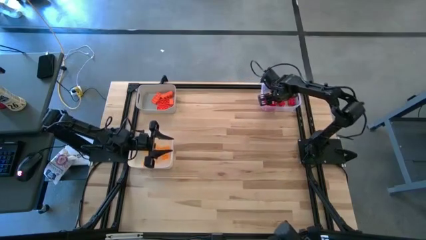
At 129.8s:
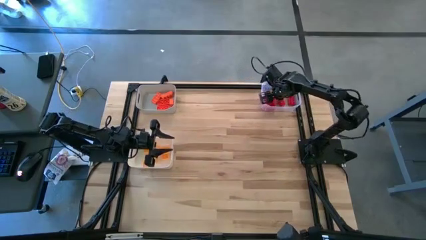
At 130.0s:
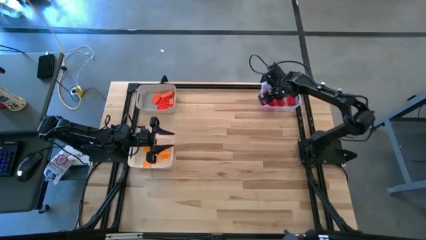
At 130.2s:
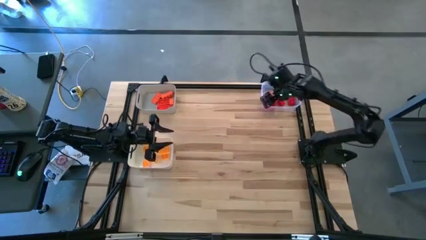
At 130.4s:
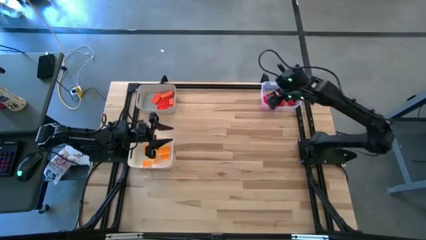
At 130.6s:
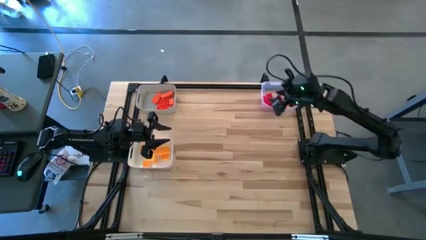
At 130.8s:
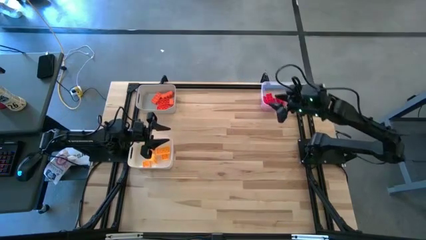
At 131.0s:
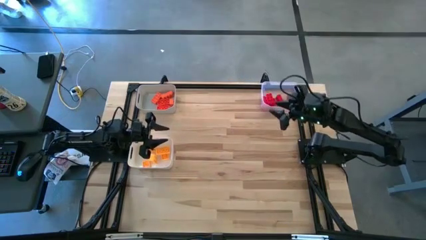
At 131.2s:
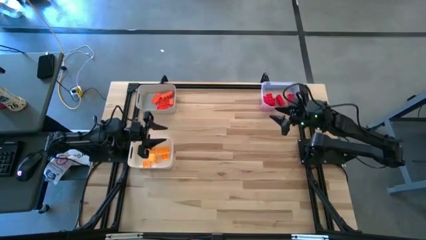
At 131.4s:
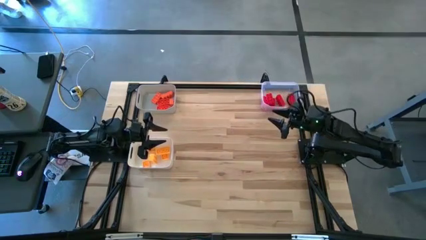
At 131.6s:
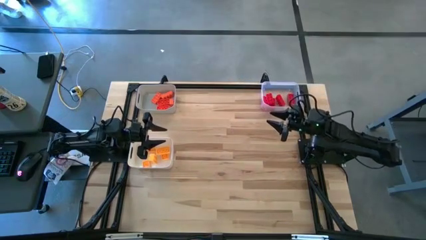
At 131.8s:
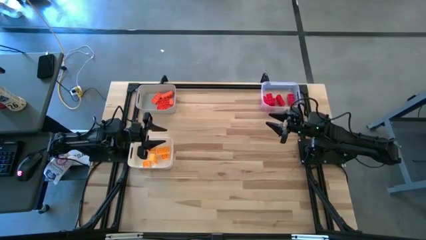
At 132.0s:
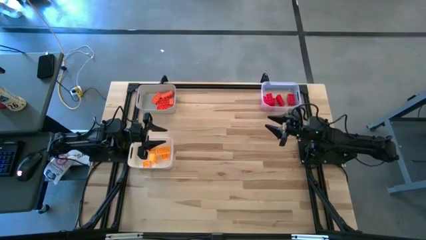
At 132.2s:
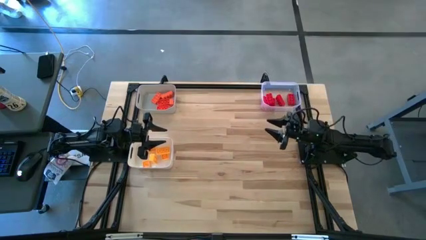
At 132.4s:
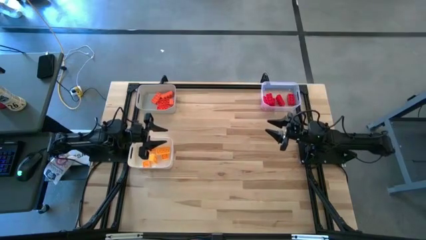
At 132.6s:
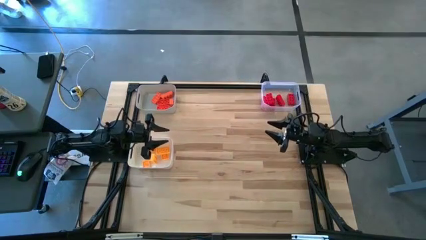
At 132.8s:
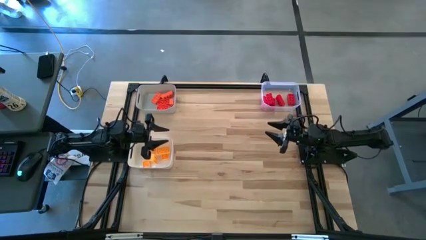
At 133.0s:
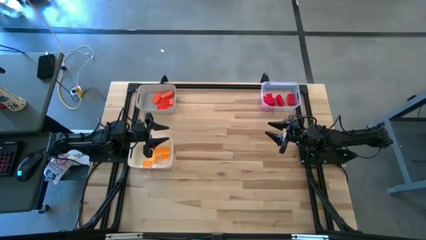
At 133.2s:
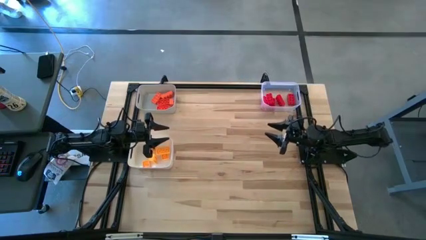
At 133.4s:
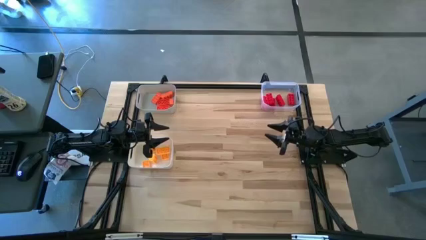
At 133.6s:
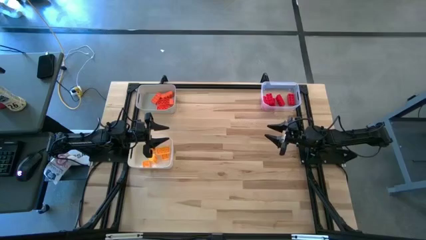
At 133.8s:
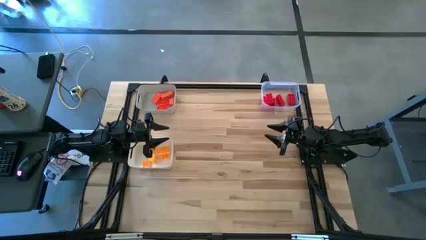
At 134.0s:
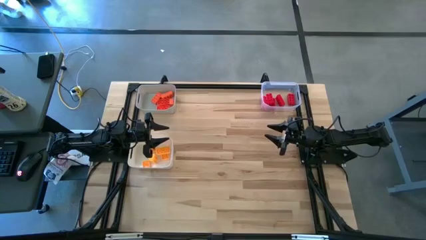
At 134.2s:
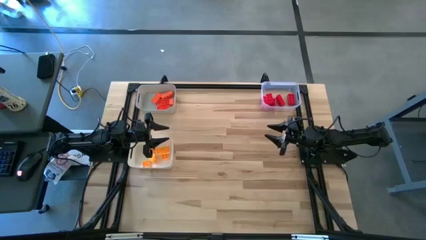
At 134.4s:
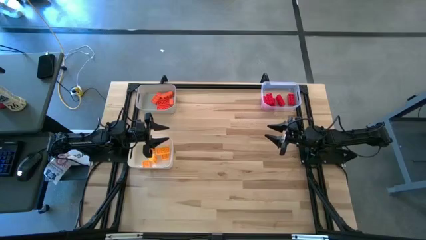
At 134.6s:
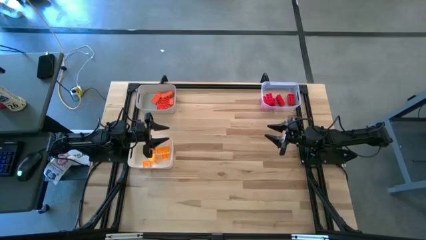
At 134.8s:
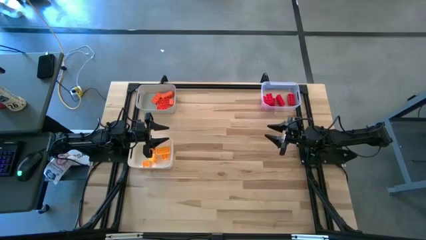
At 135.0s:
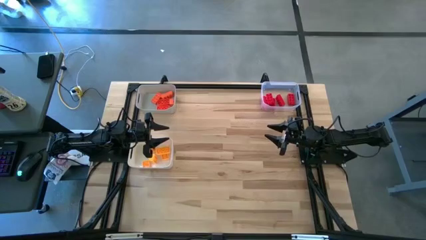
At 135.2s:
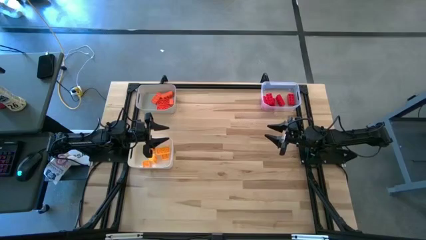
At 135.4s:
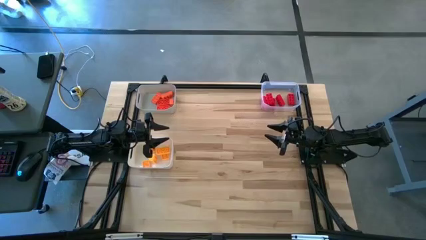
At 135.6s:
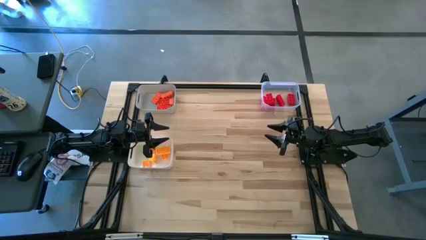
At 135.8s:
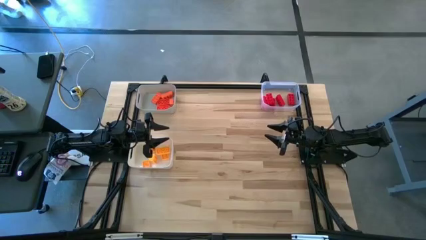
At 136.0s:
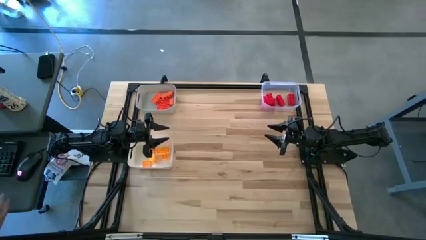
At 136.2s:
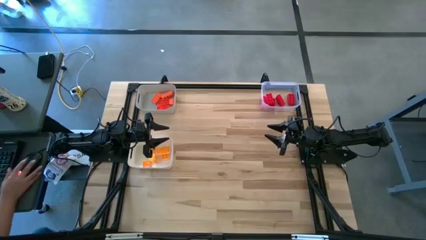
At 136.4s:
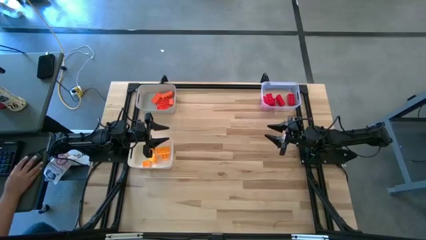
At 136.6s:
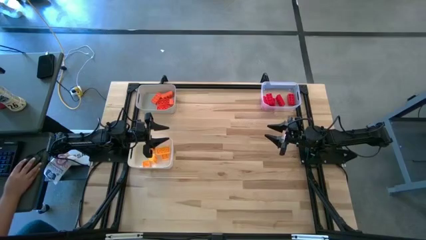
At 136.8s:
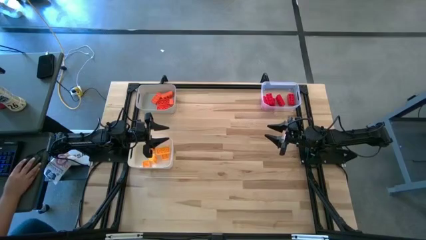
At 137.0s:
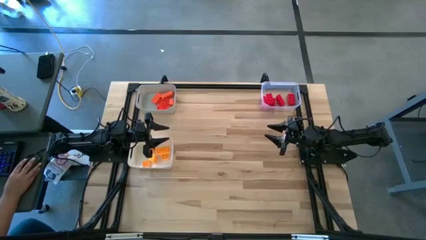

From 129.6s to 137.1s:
Task: Sort & place blocks by color
Return to Home Position

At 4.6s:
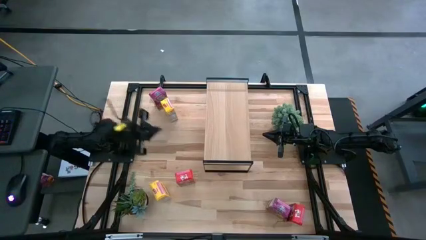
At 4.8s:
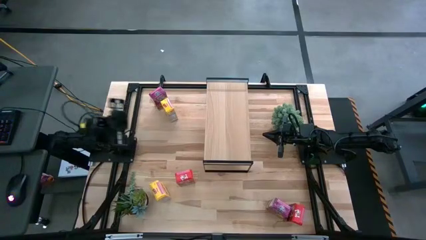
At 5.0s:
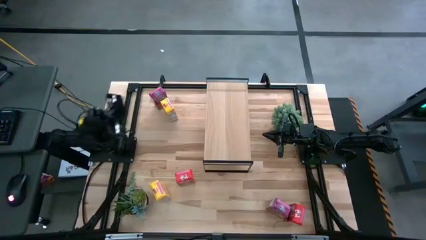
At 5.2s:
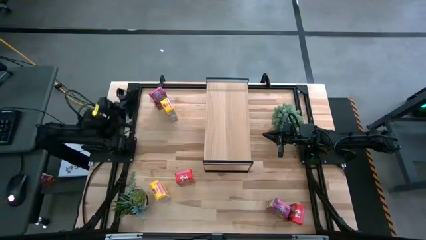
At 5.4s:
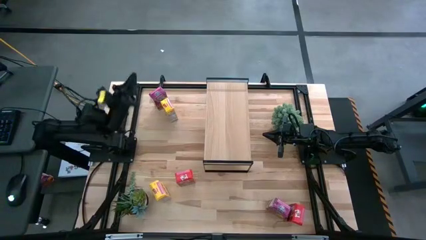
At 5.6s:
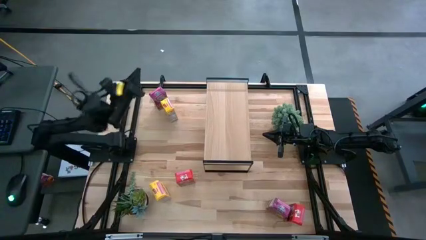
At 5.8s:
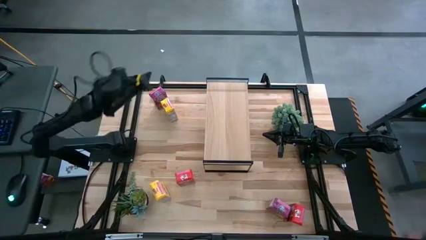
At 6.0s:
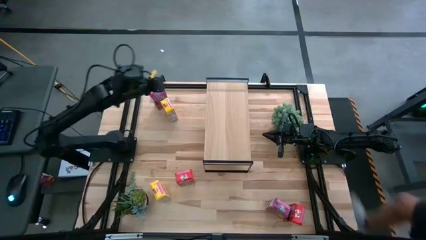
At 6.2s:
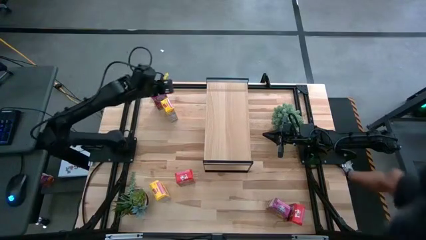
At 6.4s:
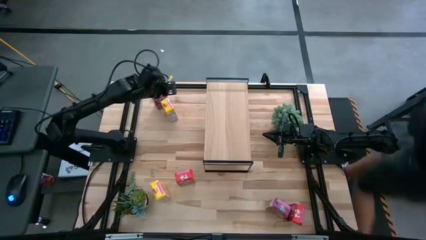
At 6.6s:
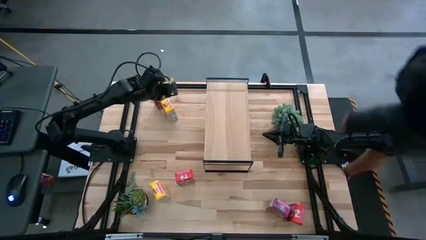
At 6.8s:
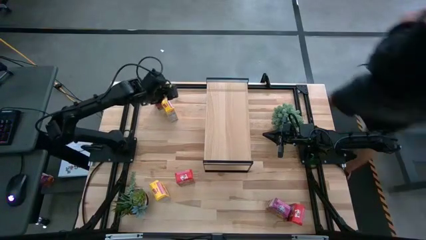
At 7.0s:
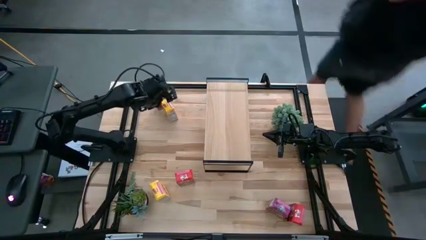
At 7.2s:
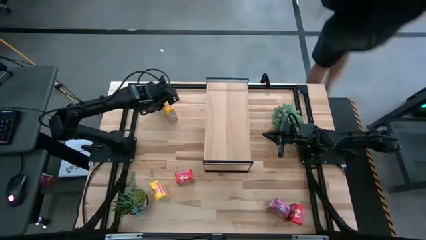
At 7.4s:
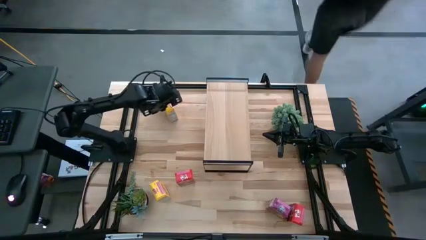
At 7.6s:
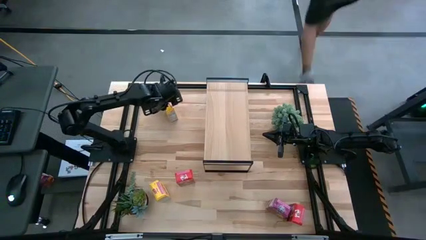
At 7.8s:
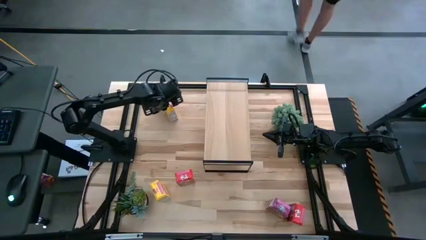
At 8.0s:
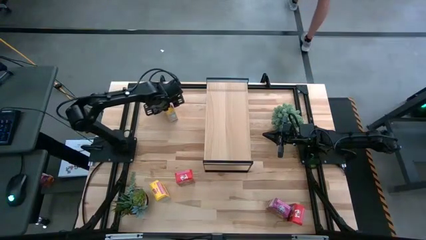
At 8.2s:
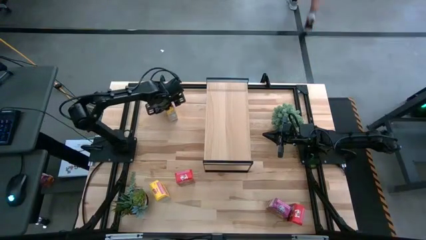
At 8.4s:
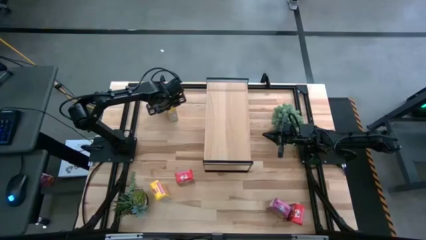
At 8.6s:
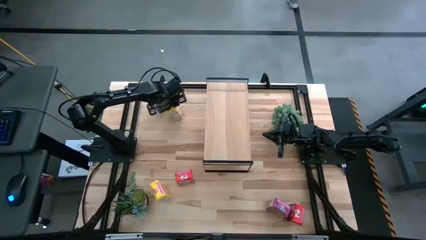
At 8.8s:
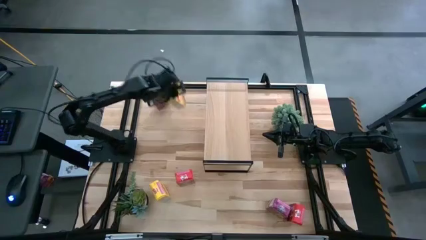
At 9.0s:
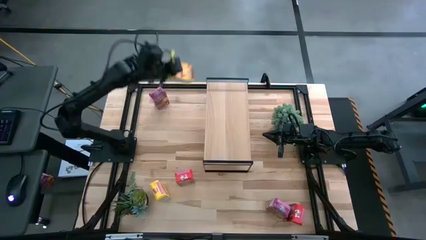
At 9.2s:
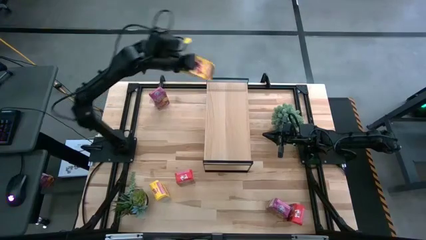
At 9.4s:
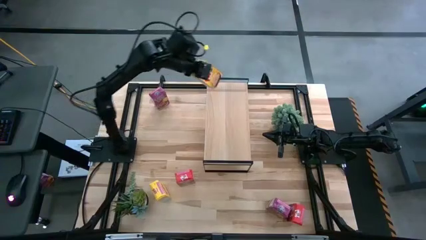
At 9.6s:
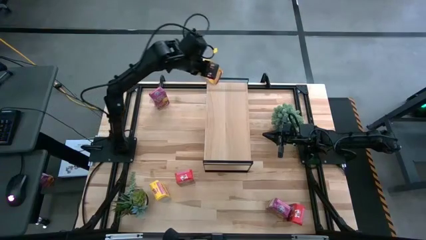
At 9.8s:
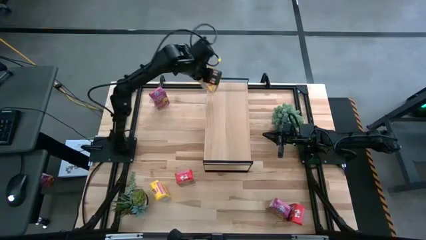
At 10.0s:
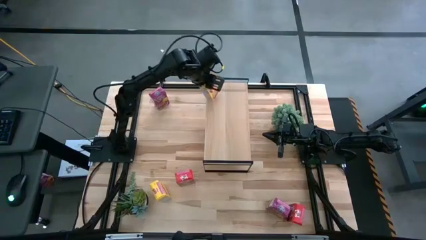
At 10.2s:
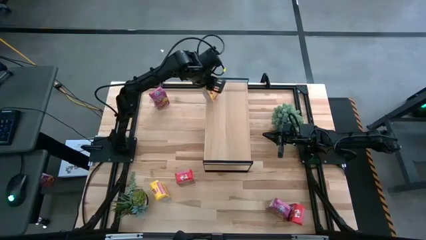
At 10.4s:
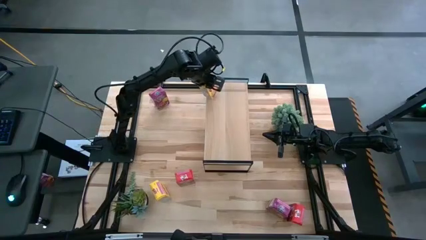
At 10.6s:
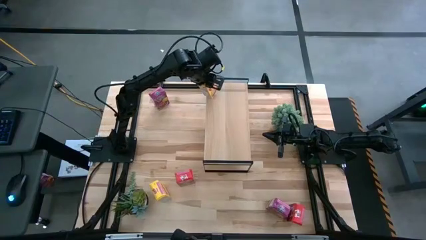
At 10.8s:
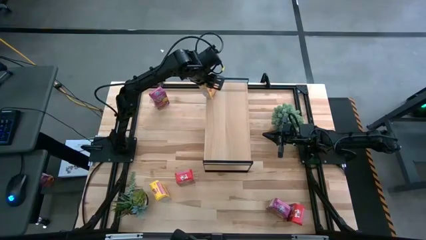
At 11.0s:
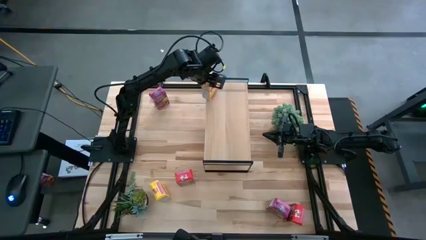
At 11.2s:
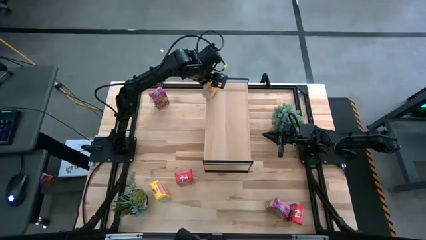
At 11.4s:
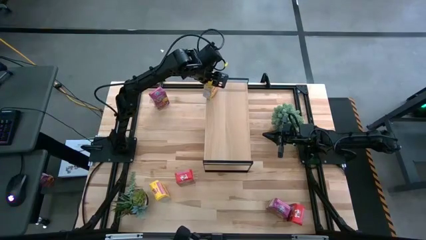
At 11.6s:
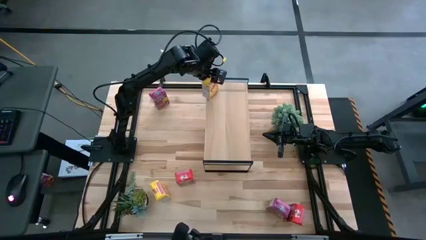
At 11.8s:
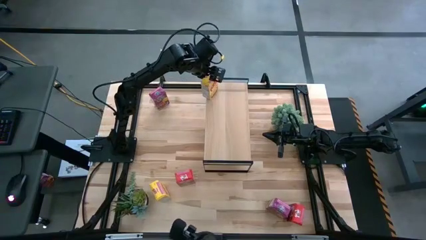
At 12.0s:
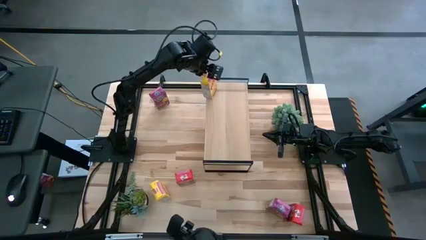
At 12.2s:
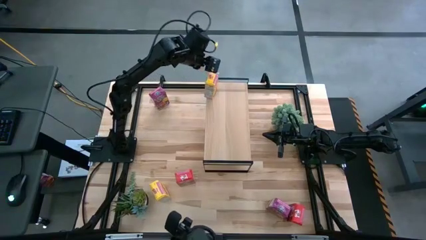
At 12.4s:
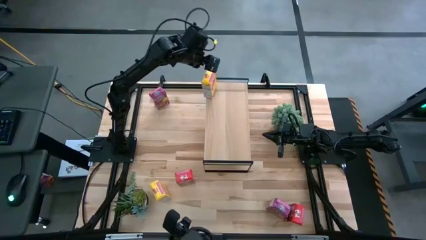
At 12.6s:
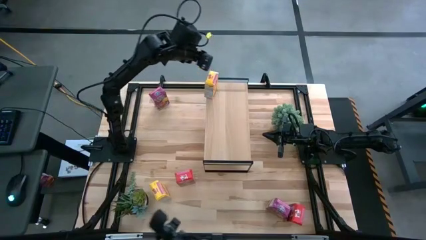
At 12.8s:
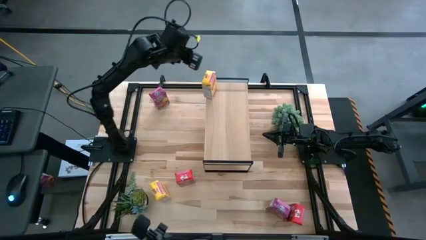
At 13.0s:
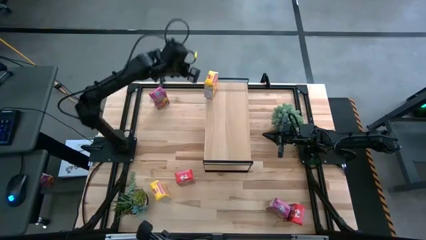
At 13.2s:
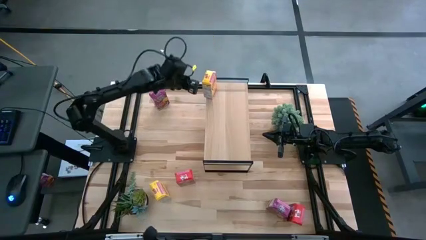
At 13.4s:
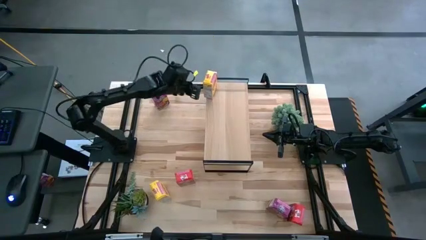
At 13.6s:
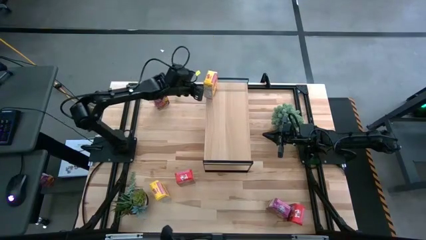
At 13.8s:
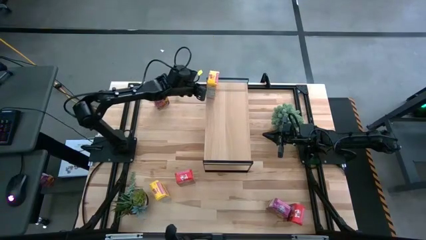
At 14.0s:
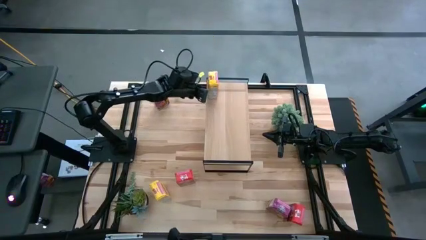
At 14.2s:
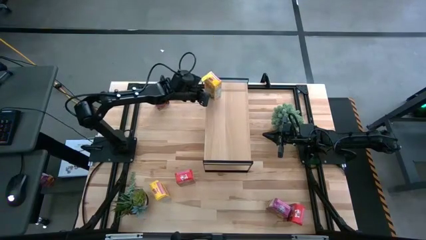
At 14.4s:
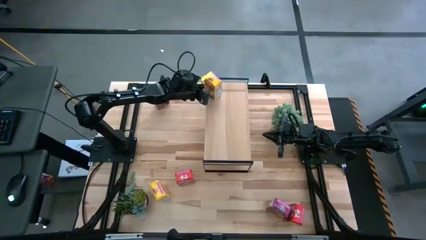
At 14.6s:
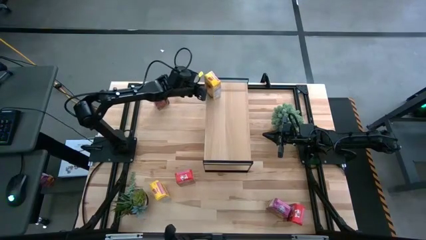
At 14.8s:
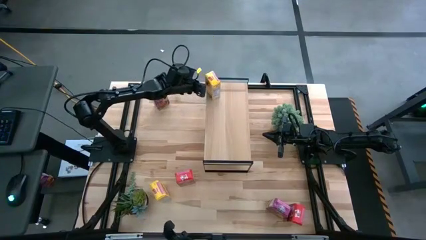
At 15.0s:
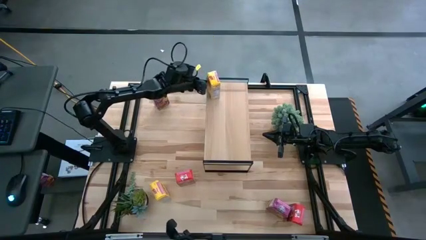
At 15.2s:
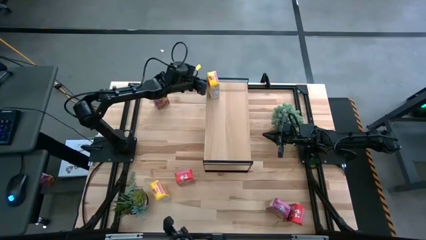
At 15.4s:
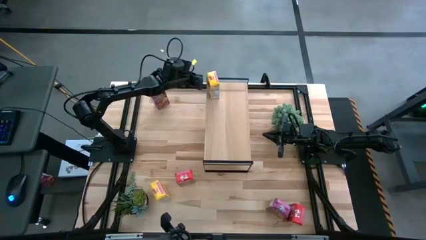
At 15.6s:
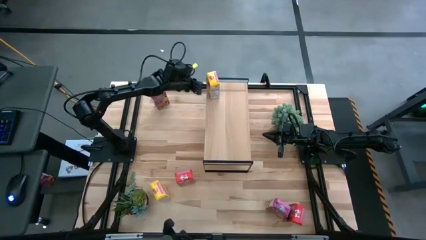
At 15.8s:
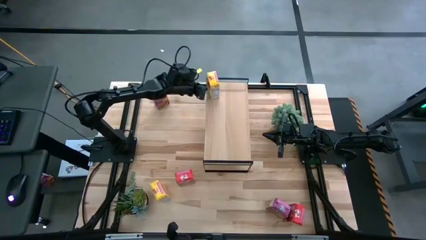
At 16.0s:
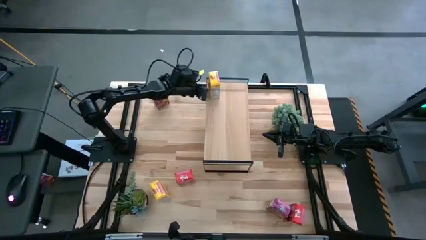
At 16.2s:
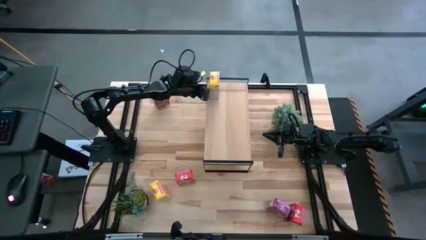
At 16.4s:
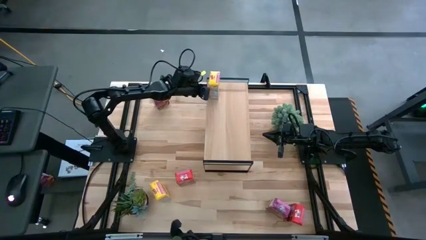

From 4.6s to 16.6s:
Task: Stack cereal on shelf
Put the top yellow cereal box on the shelf
